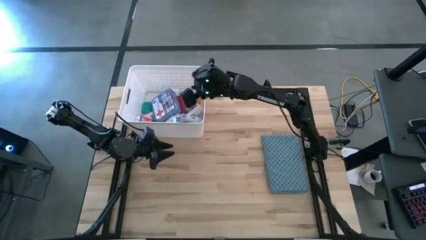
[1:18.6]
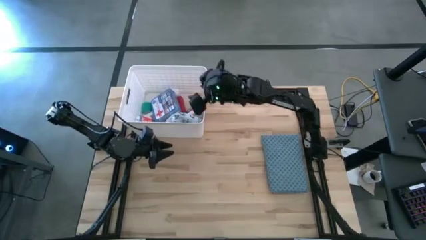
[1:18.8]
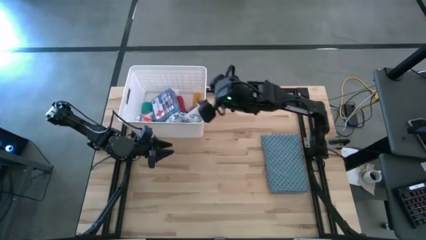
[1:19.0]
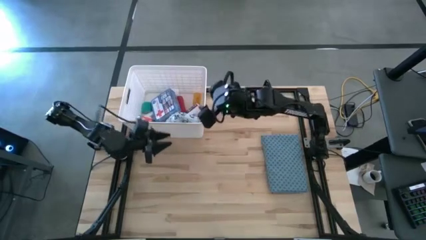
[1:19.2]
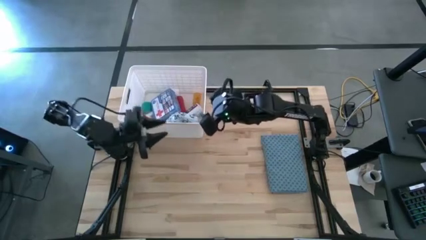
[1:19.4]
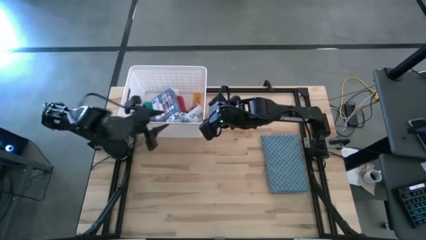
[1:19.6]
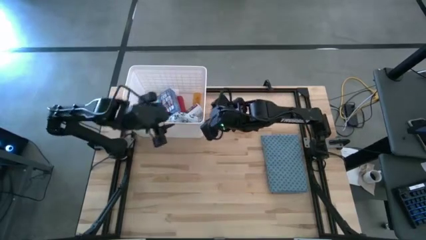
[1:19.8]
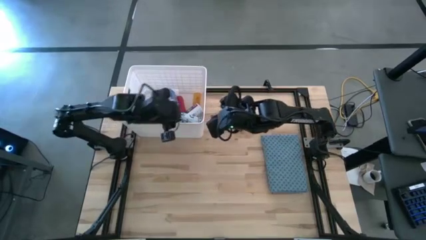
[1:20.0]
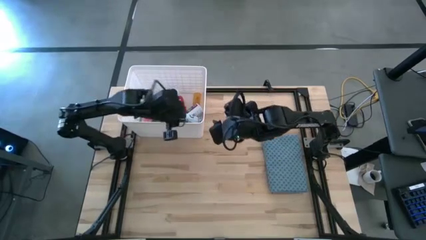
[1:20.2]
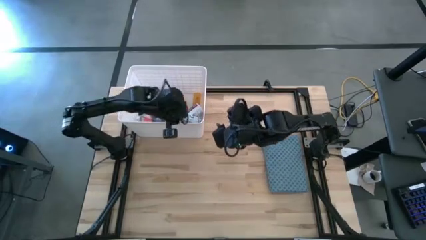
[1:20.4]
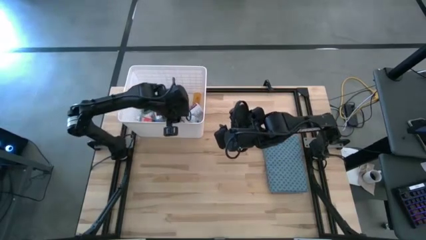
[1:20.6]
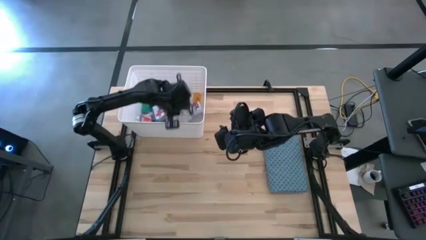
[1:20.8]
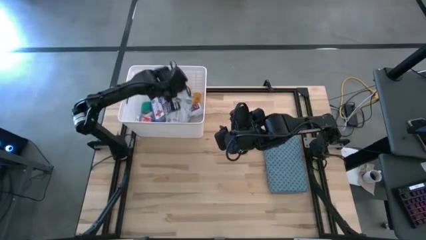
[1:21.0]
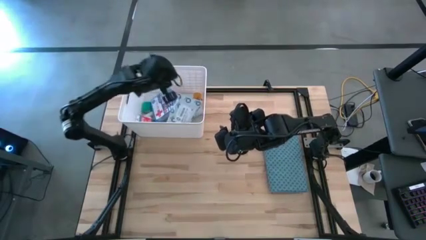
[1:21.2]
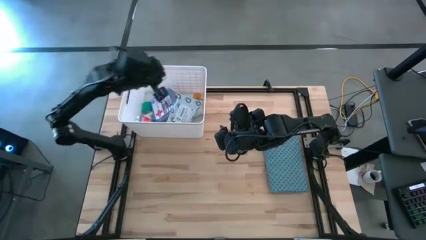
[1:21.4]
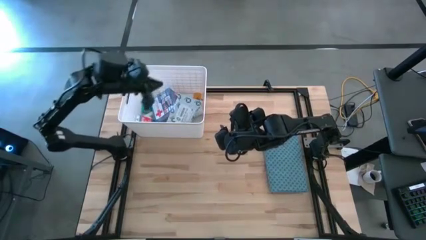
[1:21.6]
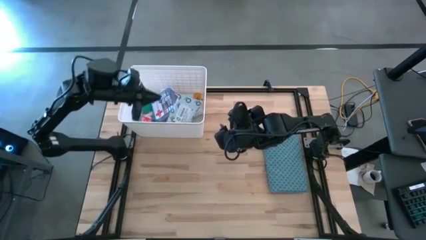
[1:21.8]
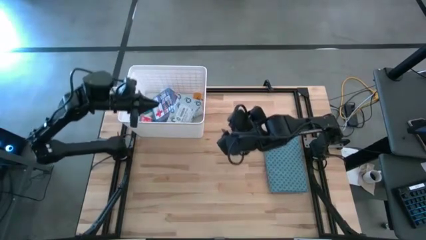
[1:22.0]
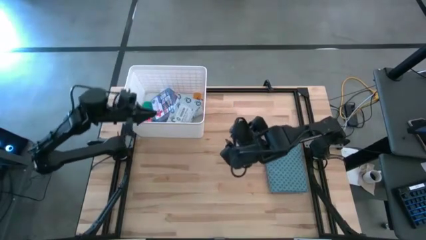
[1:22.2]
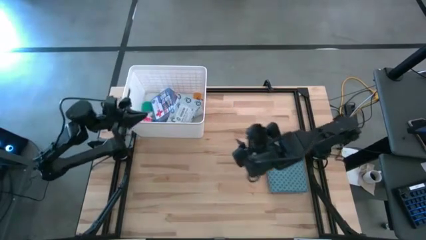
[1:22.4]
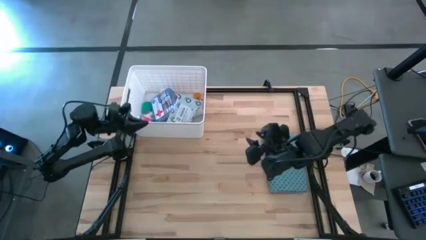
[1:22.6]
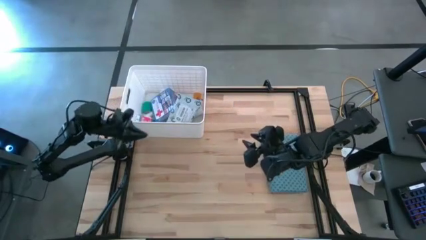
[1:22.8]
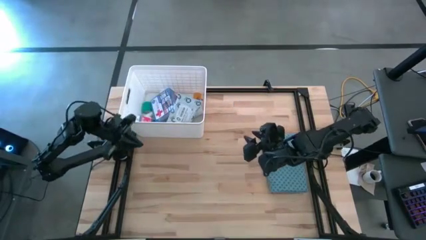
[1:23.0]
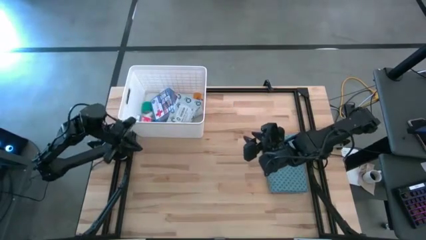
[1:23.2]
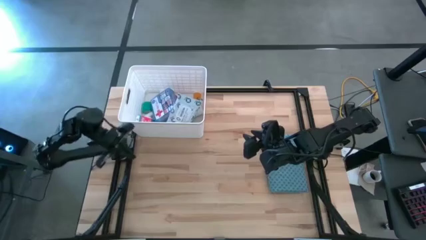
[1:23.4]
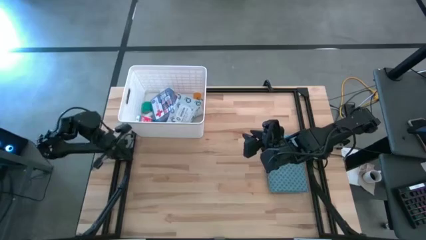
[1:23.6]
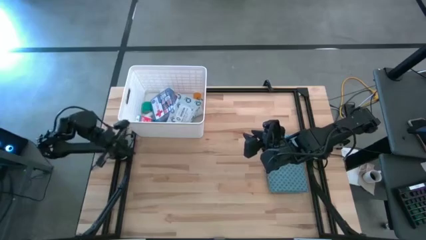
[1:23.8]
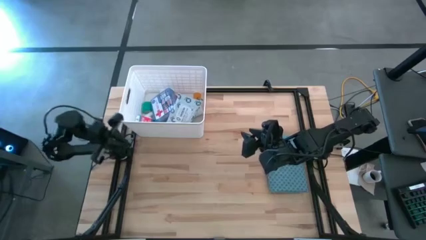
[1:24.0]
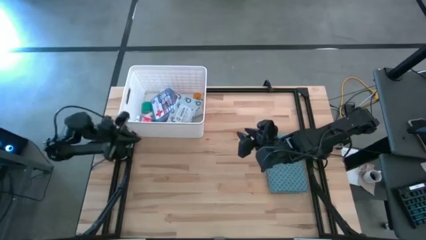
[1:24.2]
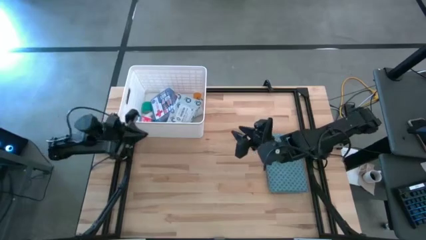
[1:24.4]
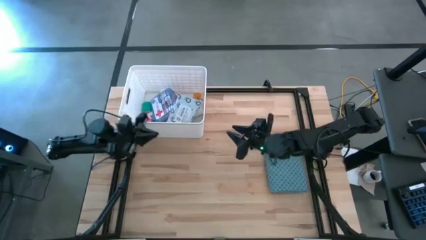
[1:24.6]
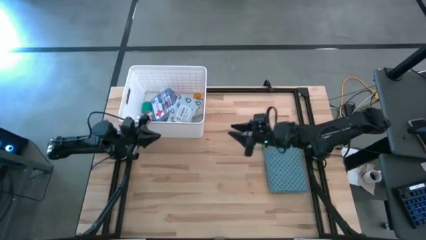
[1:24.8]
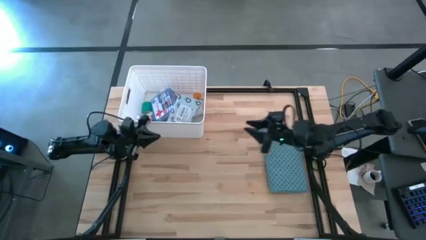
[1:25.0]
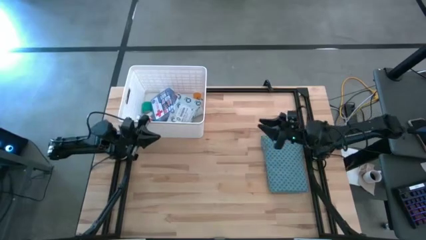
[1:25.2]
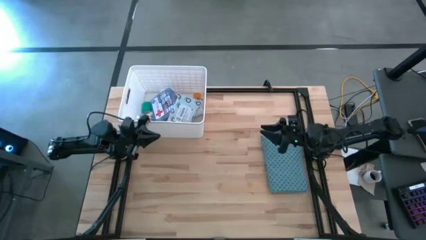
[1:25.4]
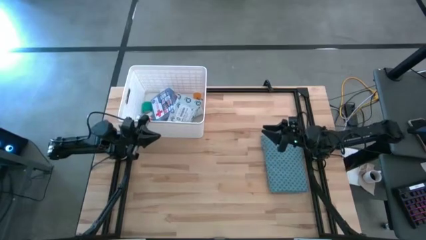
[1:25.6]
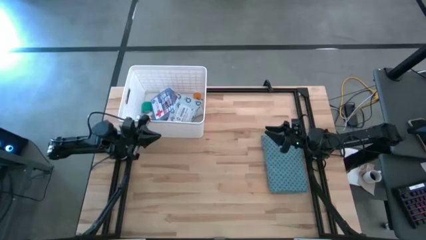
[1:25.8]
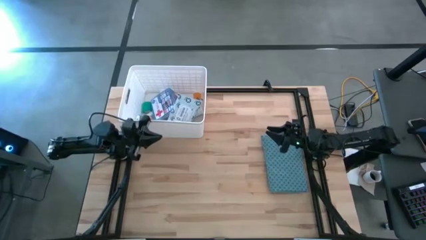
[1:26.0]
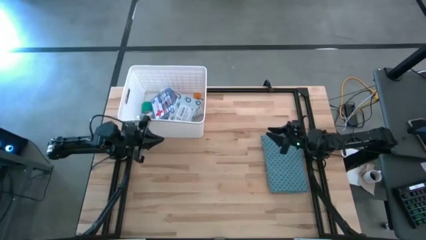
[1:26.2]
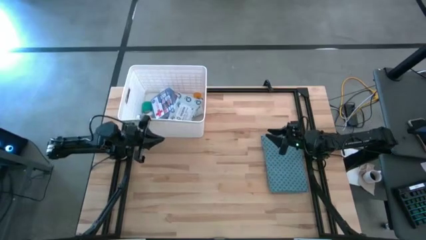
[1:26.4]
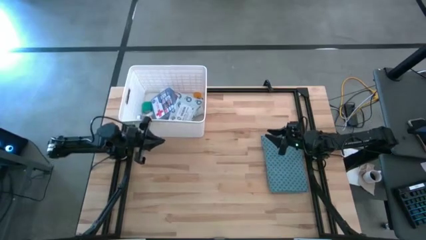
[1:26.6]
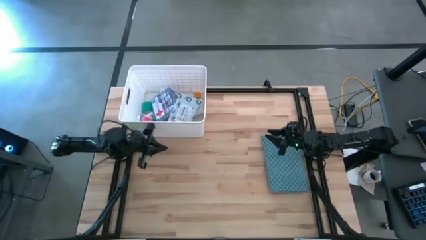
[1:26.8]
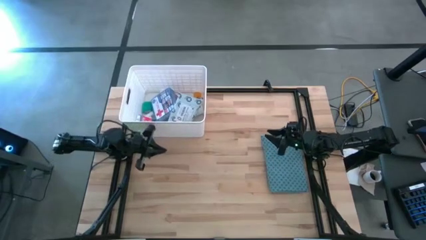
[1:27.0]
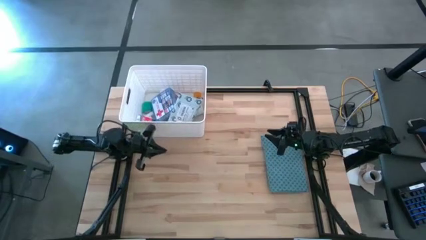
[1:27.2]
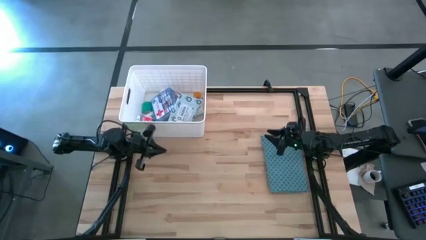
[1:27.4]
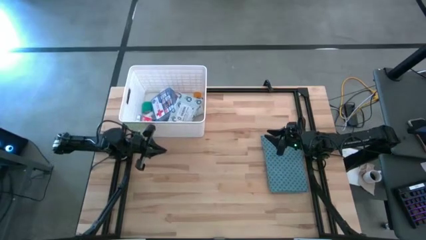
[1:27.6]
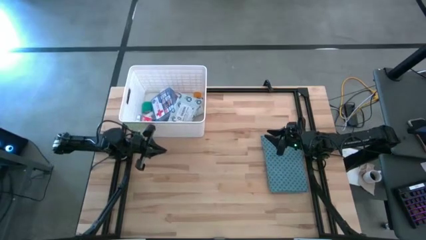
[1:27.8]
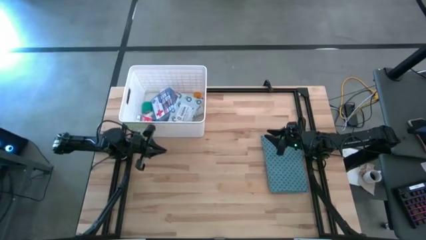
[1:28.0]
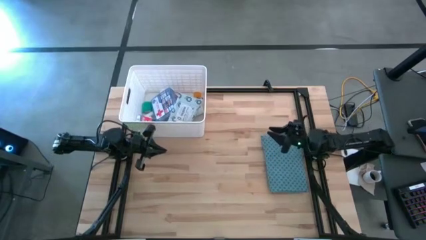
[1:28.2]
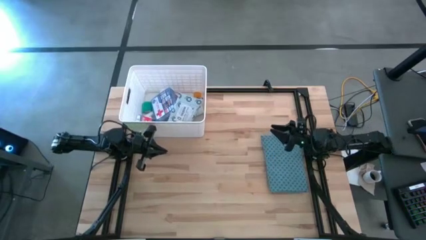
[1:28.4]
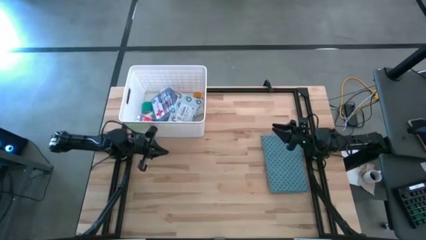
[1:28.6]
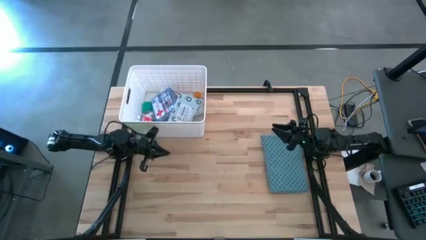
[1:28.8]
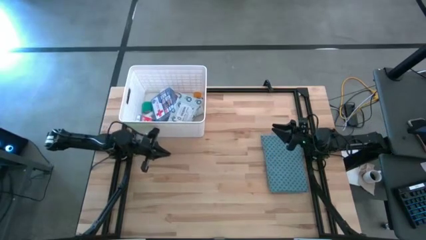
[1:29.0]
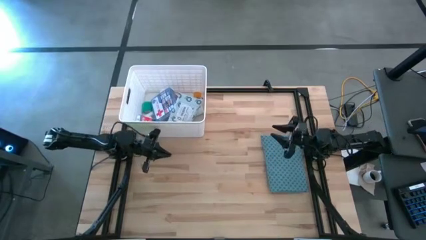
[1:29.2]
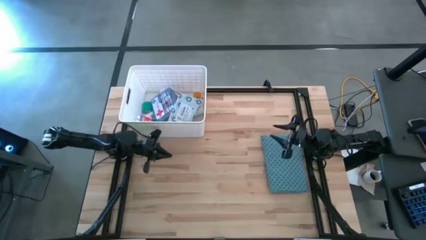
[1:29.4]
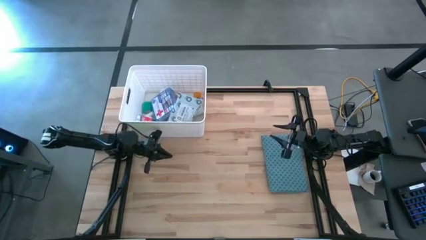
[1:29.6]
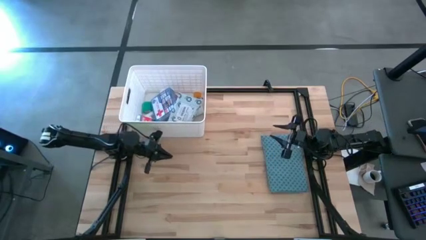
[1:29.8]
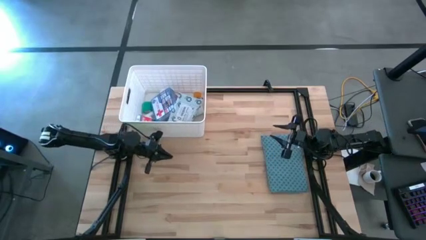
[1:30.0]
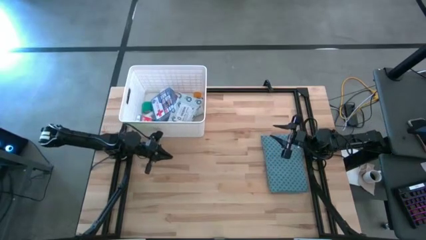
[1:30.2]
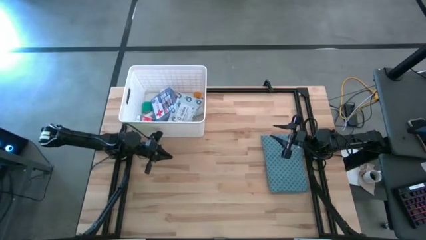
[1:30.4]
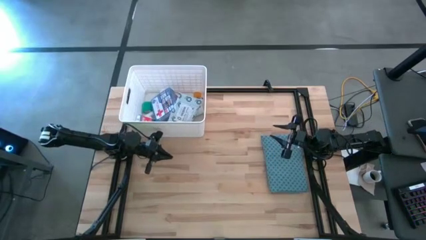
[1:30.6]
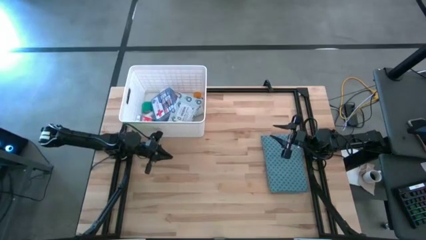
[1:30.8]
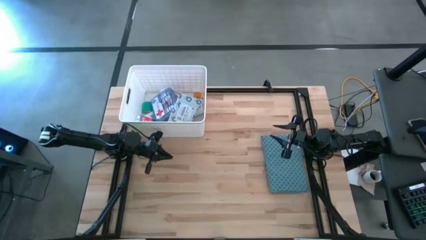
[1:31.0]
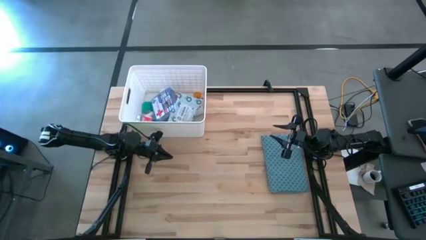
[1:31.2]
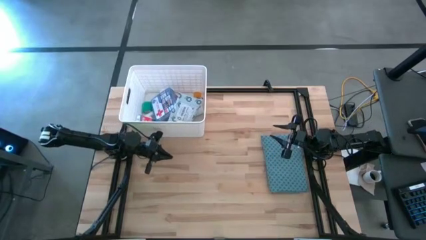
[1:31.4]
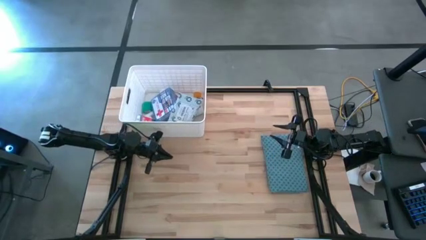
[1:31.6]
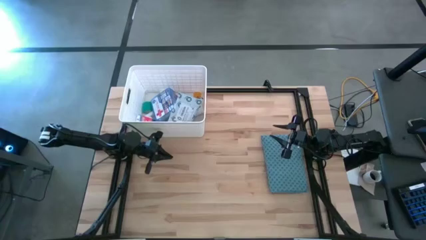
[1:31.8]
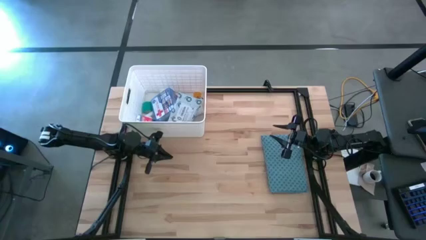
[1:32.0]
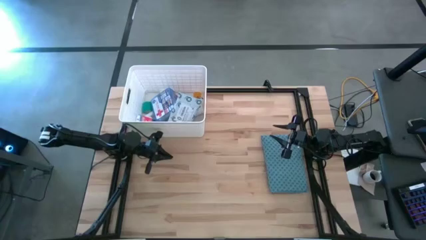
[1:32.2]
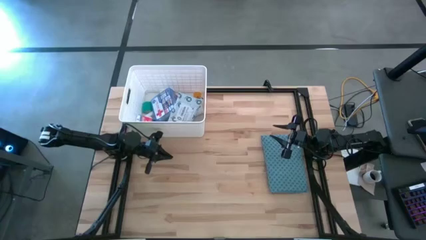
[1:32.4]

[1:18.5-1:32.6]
Task: Pick & place medical supplies in basket/bin
Return to Home Position
